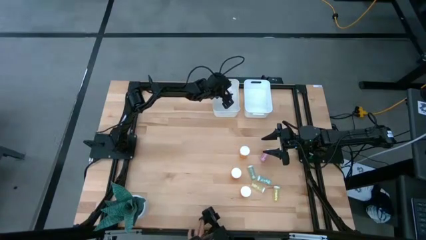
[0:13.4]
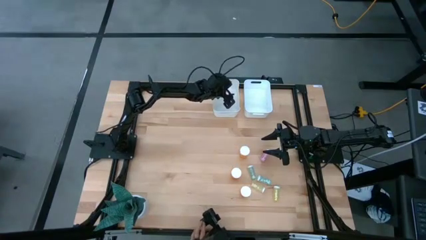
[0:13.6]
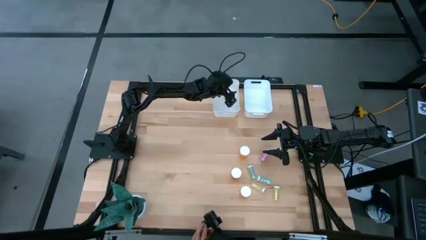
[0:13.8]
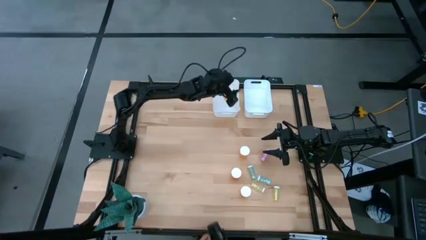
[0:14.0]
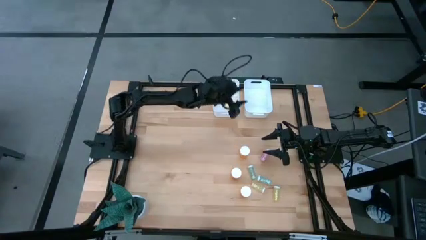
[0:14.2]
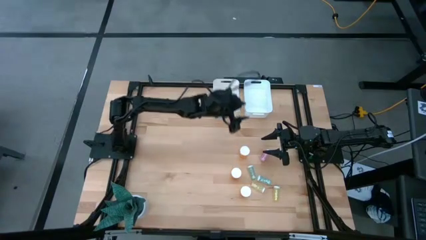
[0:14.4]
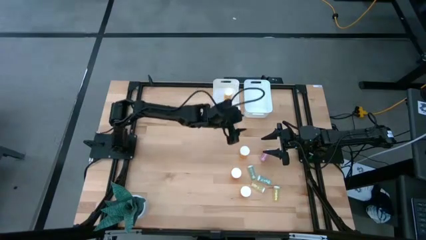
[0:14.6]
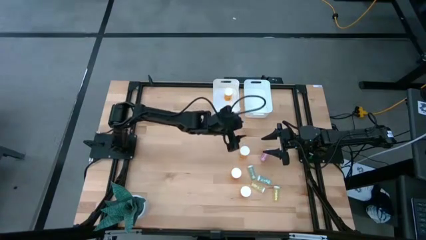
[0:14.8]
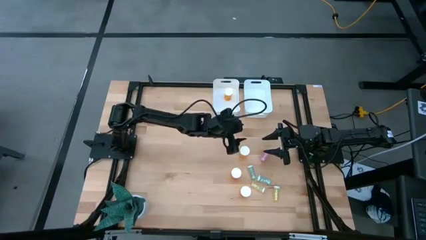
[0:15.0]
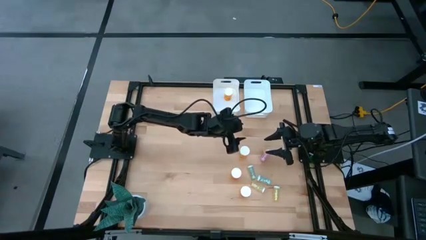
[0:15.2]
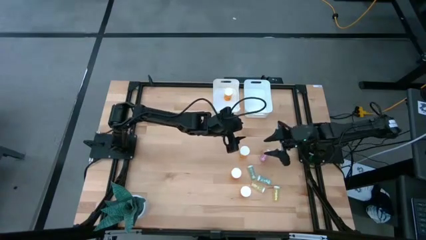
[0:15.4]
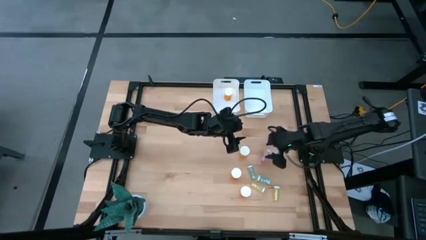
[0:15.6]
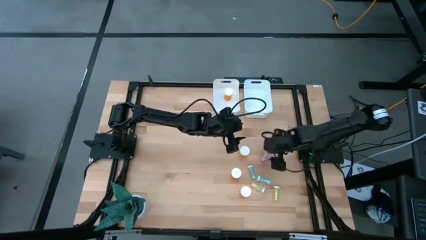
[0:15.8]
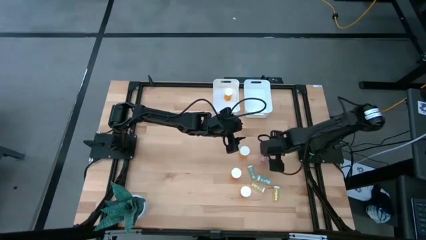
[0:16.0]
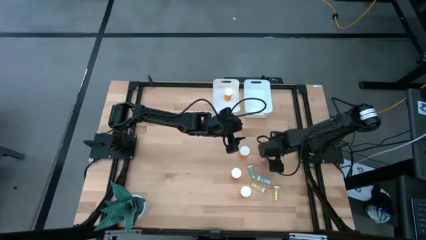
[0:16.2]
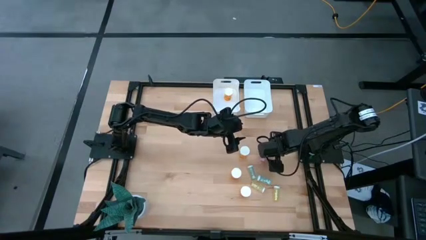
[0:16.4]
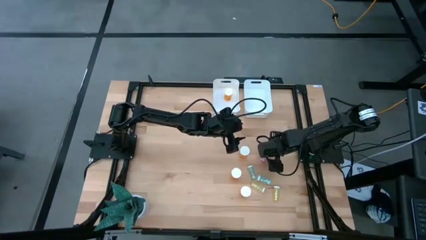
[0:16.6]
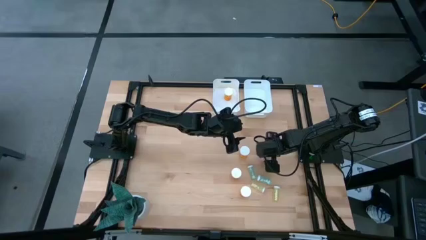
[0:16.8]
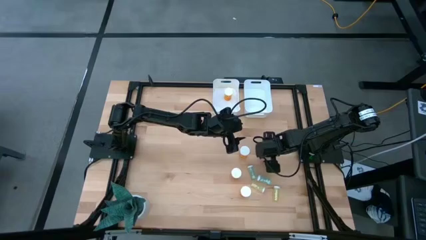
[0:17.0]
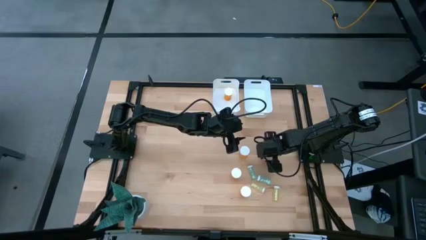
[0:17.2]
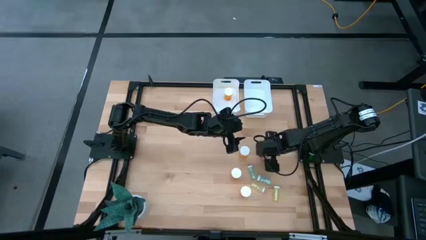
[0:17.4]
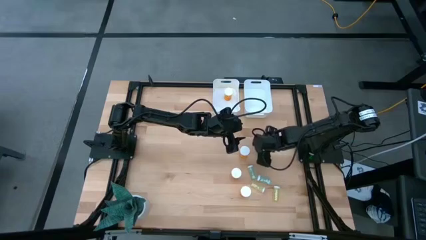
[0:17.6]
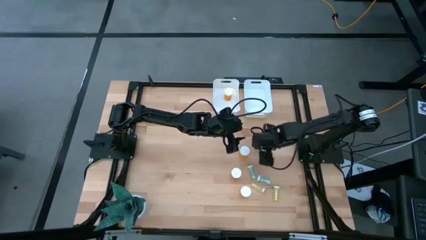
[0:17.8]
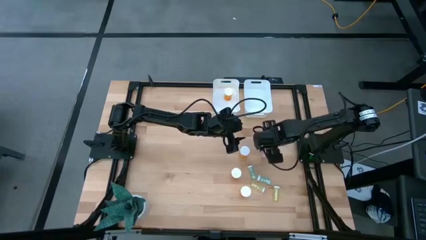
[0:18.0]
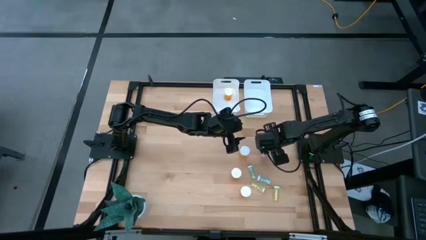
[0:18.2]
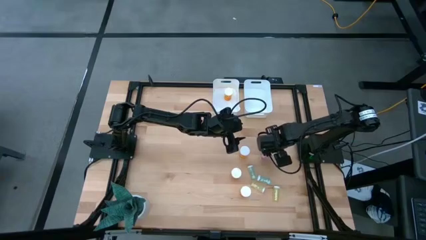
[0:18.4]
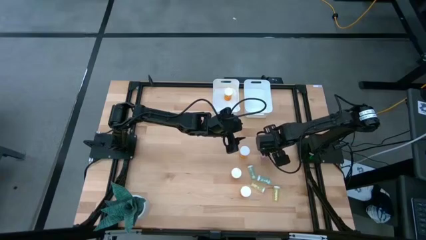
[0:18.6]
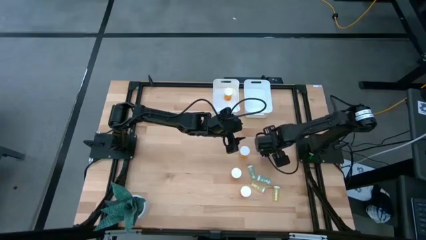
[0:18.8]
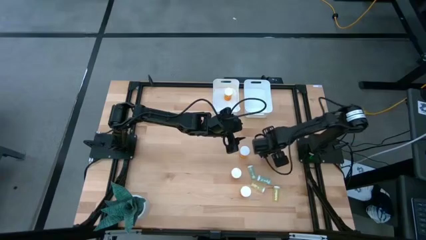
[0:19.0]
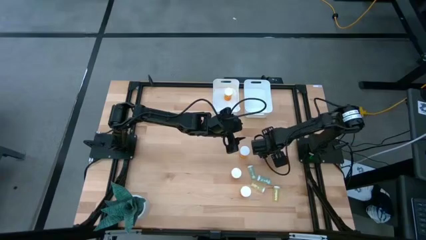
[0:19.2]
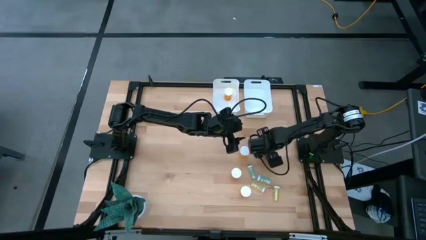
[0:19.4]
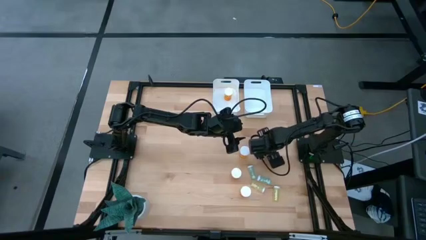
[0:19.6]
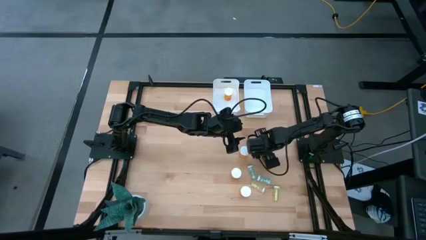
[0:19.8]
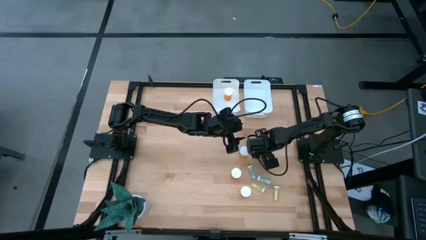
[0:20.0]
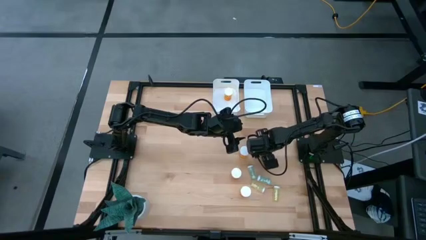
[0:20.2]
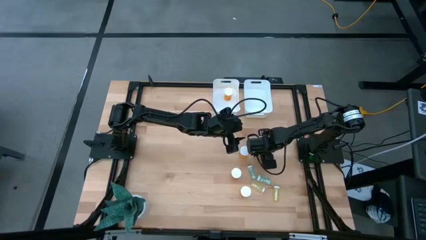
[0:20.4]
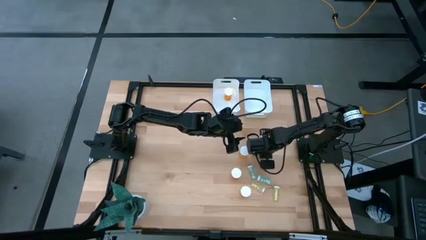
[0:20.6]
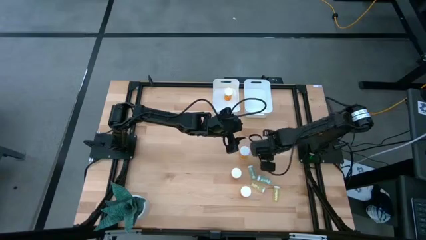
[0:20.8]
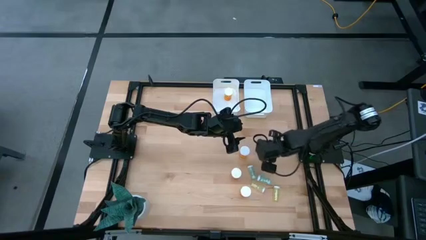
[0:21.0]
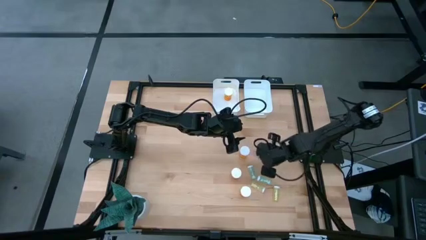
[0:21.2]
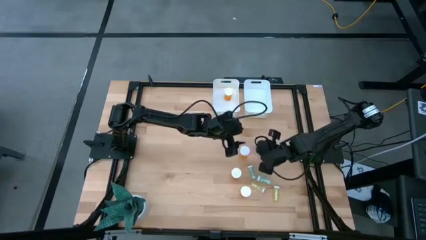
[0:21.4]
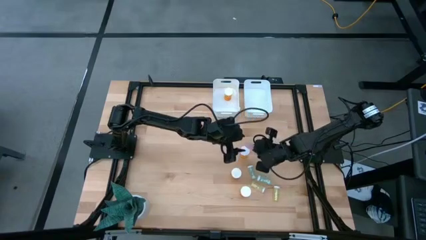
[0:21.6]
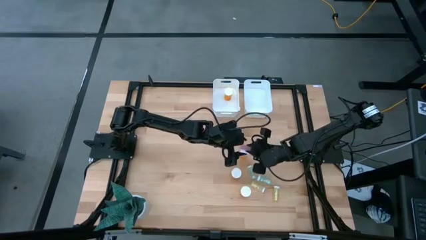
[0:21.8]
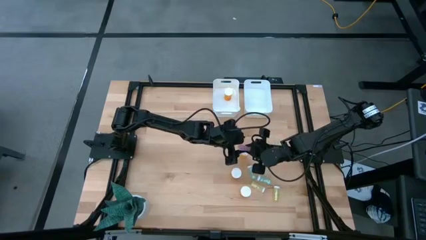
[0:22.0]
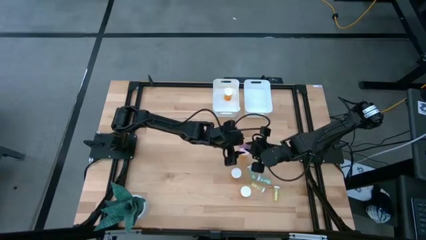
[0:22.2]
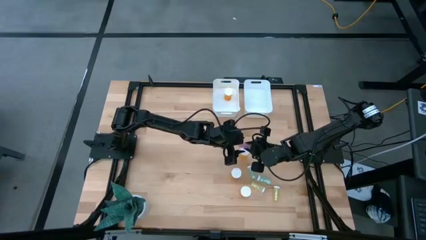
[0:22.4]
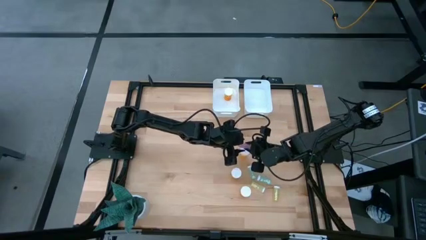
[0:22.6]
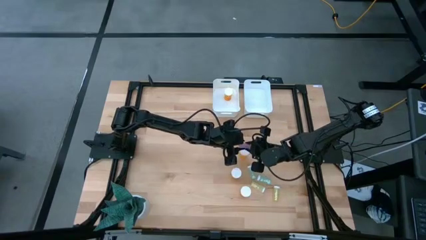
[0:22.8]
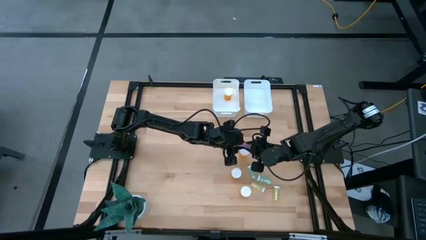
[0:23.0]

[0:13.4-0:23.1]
Task: Pick and place medicine bottles into bin by pill shape (circle, oval)
Put the small purple medicine pill bottle into the right white bin

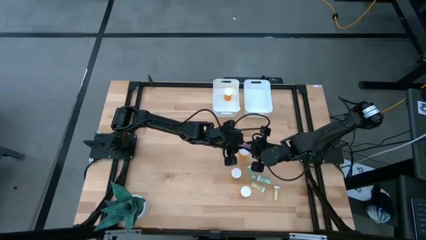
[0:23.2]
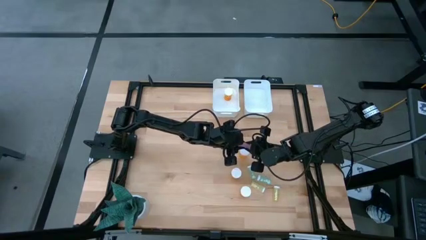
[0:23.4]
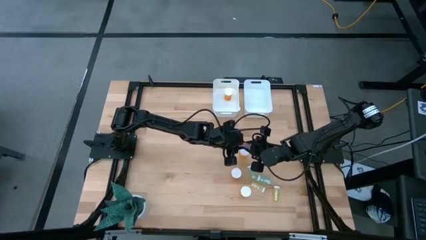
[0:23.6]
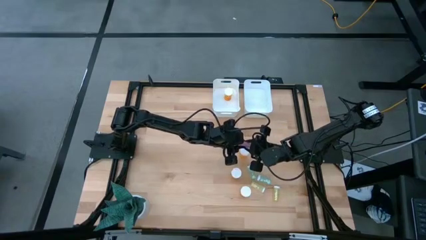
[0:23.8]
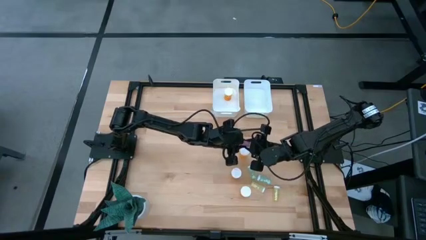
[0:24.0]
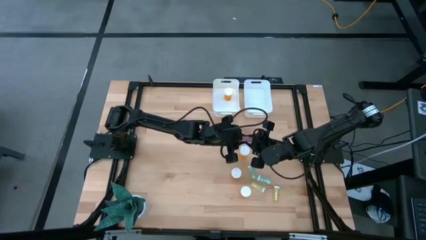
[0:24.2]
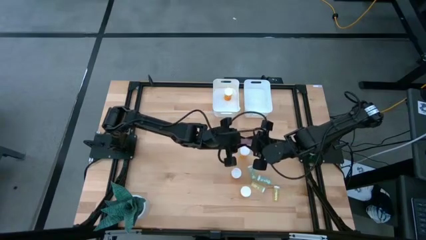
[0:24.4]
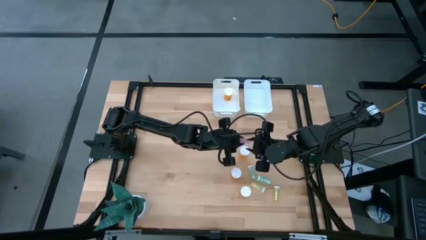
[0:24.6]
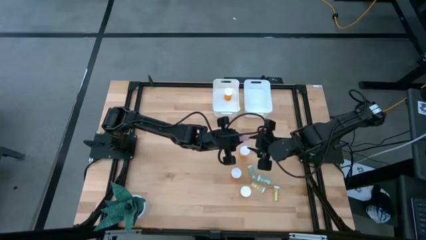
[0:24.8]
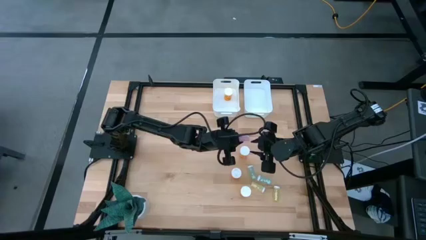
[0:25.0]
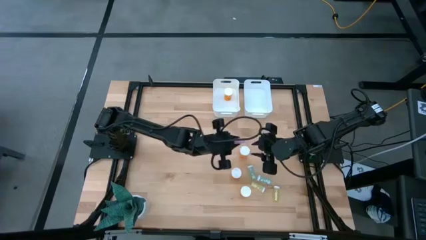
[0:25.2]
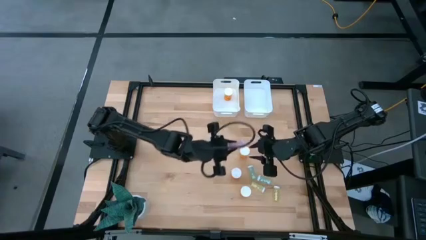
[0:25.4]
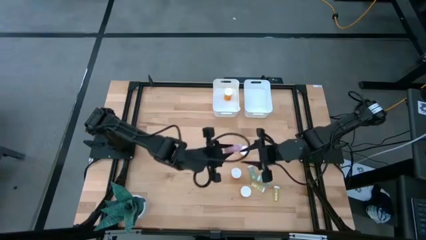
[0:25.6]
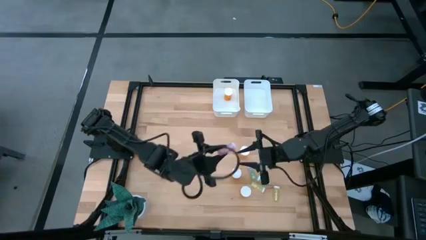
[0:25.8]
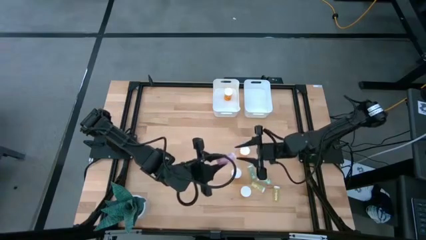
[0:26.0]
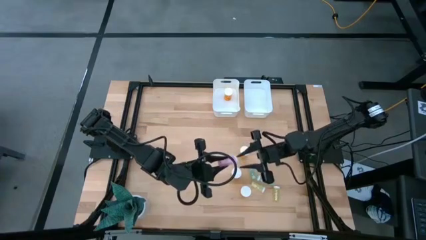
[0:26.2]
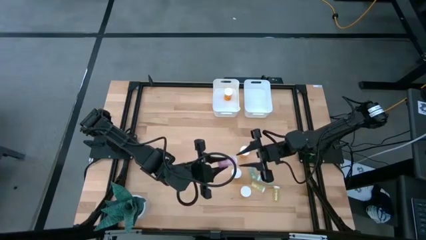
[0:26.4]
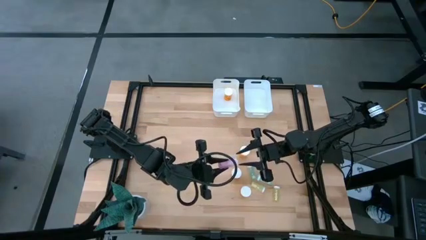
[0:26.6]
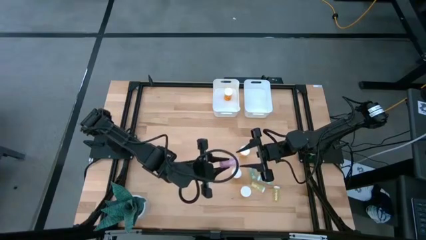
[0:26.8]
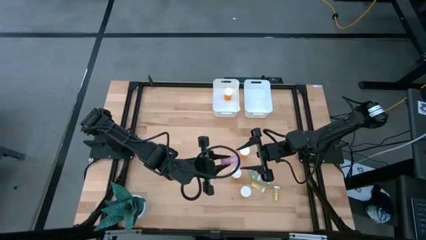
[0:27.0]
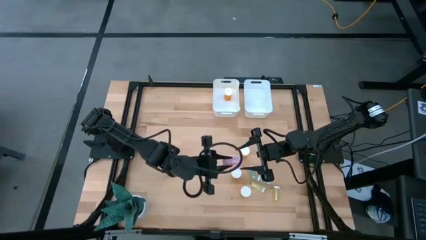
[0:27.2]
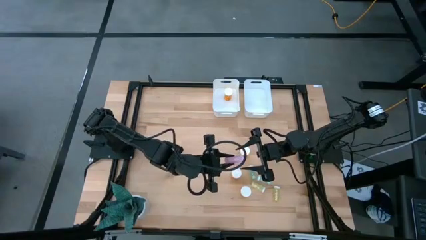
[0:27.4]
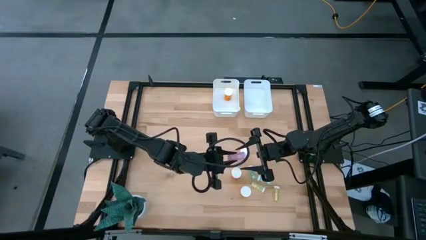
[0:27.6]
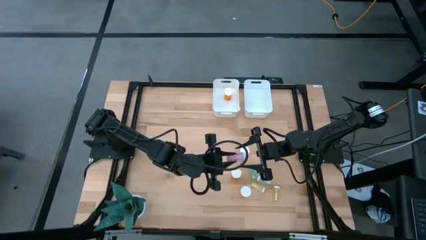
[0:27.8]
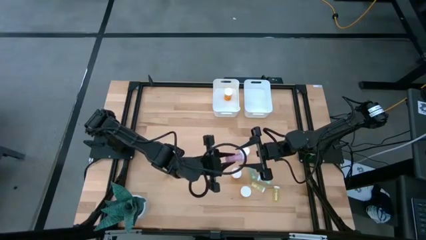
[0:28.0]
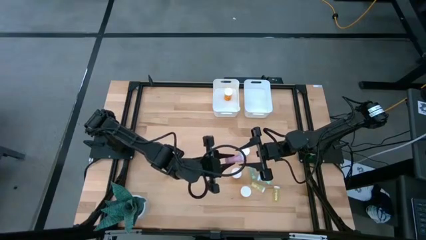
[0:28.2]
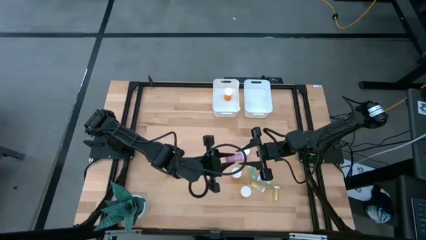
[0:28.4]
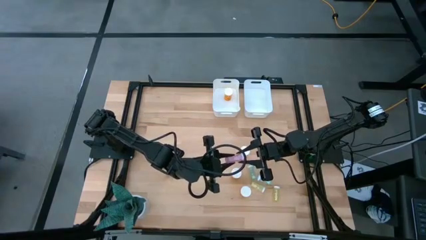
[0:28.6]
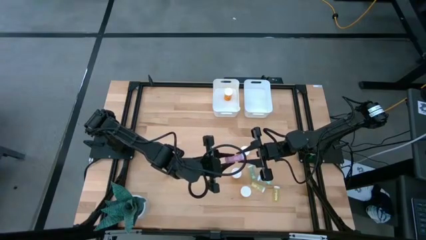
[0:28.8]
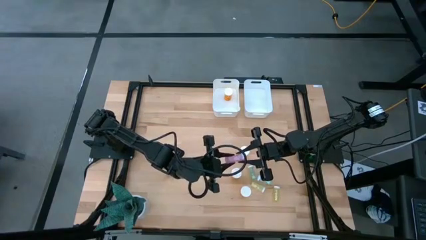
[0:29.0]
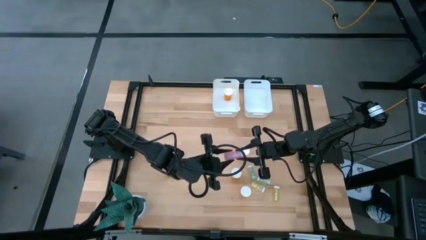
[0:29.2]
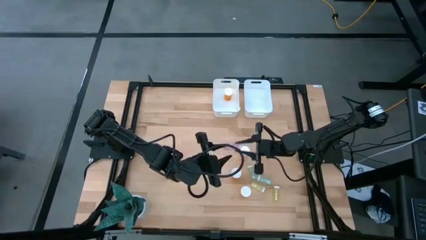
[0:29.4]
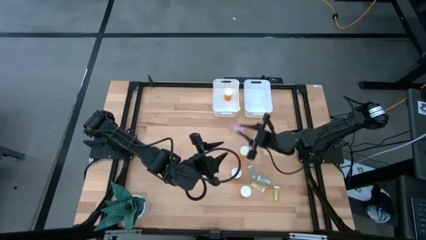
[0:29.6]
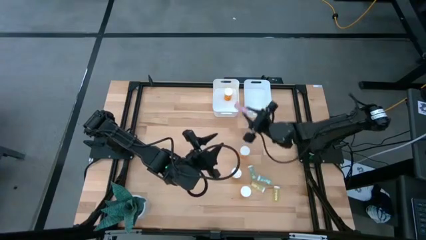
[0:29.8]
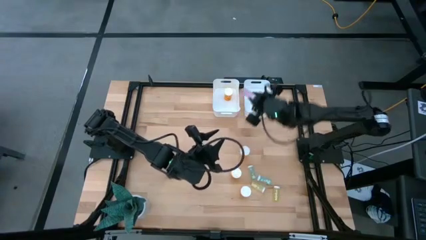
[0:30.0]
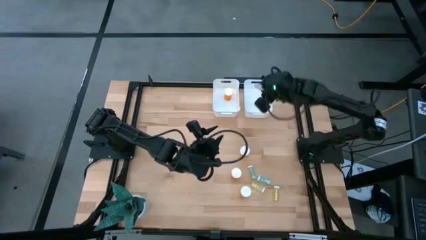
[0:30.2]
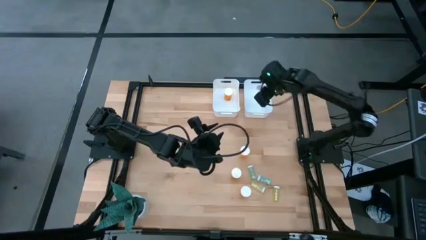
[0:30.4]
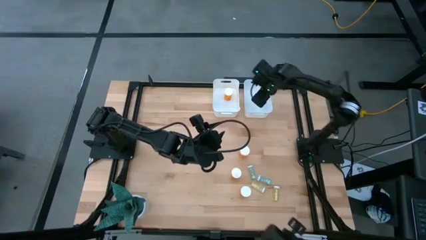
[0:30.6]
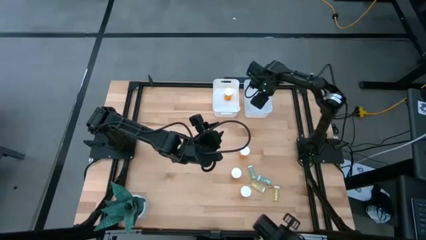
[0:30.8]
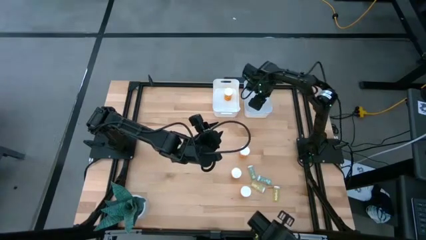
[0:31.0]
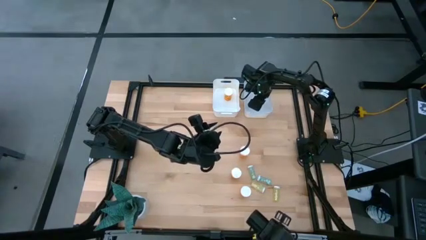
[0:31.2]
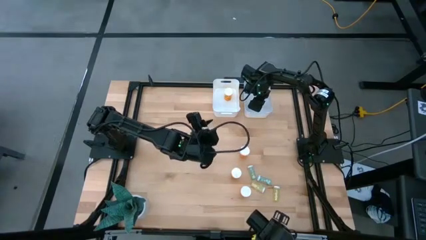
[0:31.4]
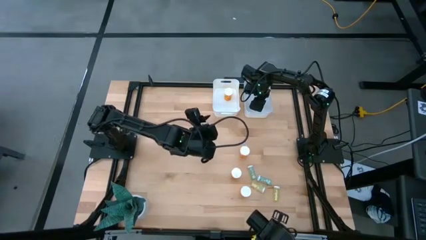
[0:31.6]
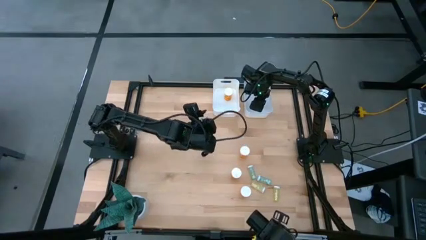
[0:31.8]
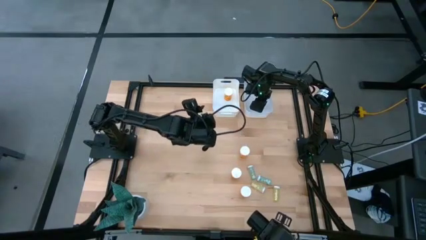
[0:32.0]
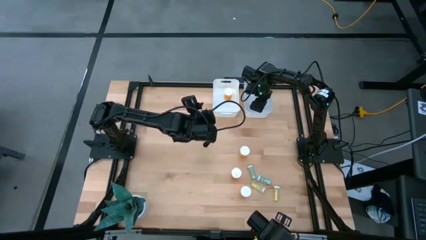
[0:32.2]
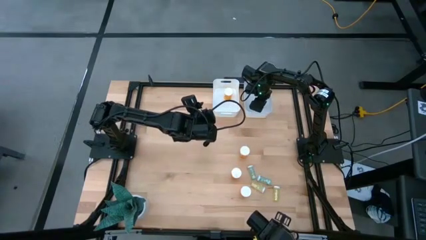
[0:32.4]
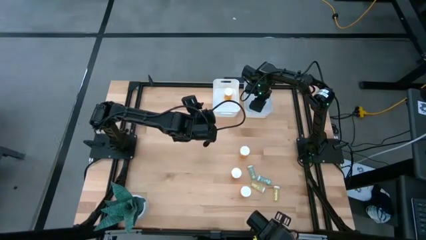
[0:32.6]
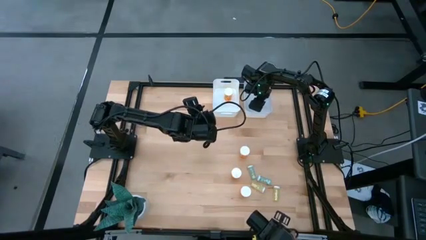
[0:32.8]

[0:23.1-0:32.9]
Put the small purple medicine pill bottle into the right white bin
